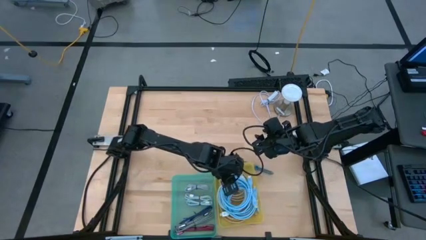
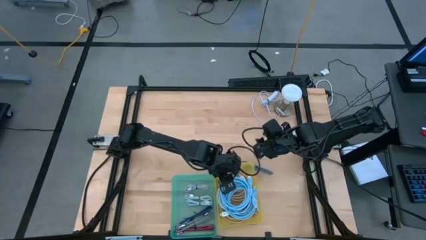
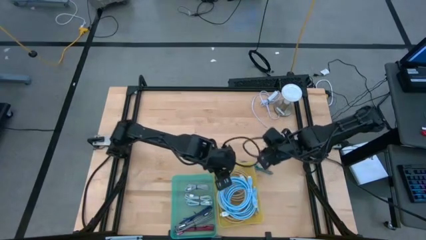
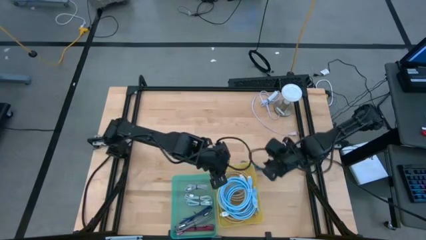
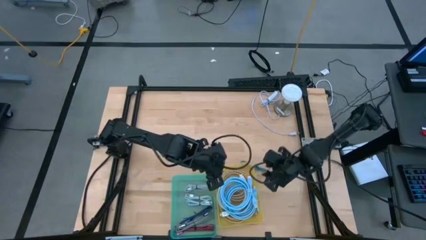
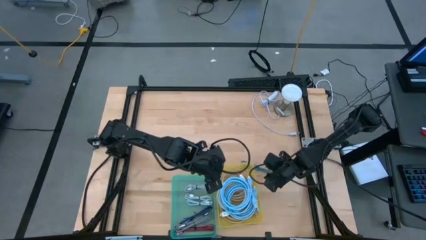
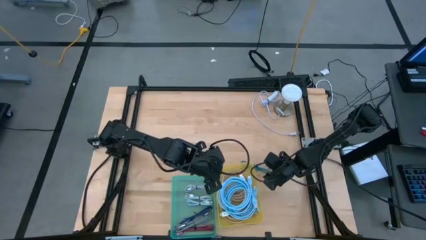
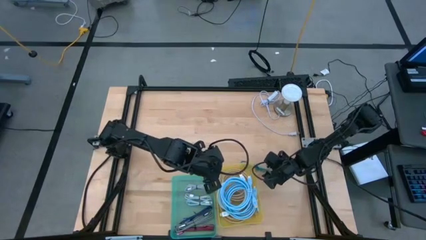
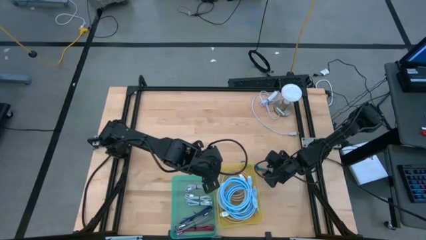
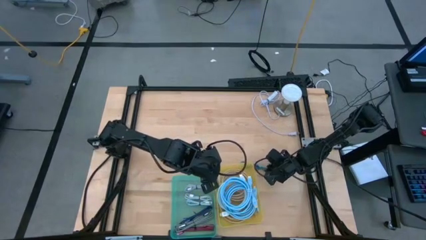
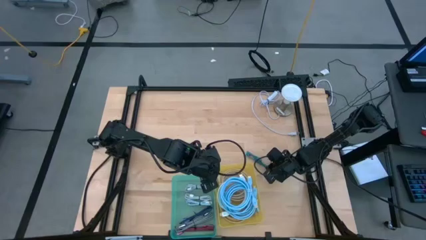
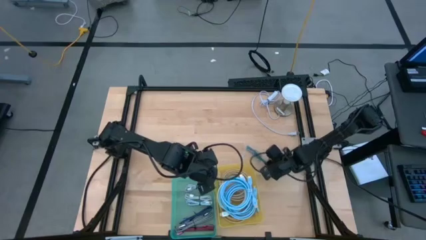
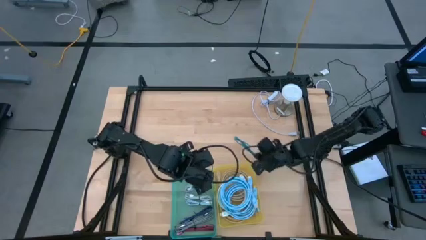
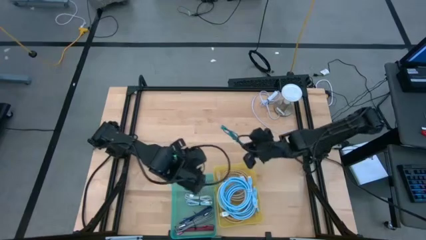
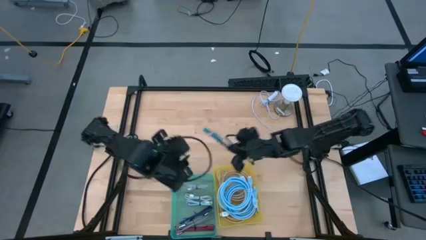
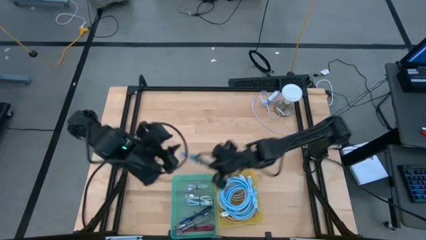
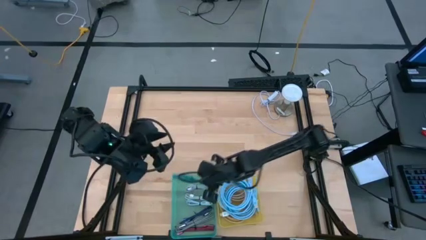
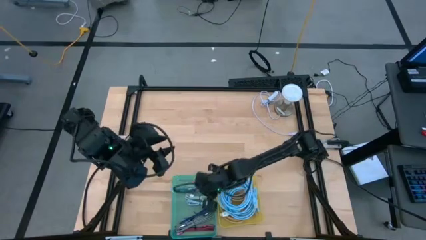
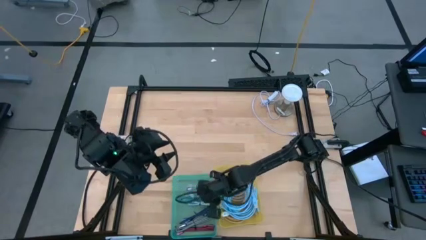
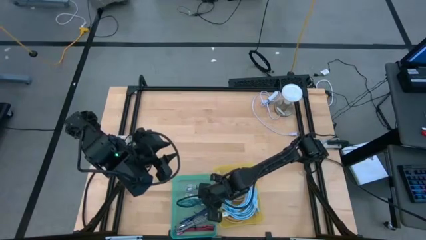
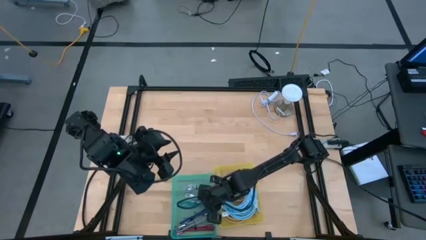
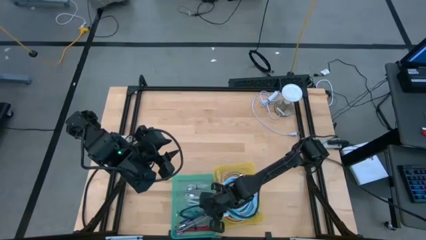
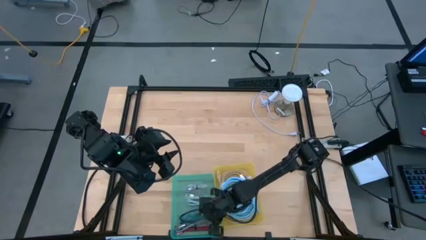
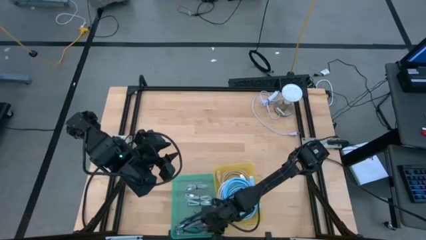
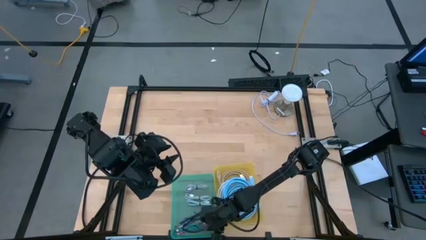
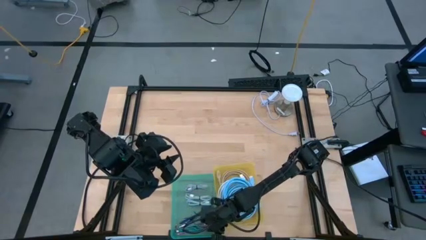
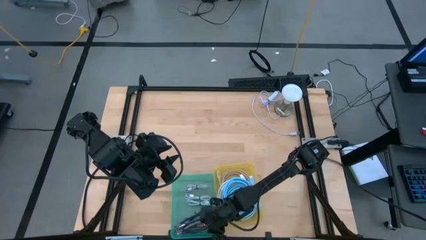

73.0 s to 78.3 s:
Task: Pick & Place USB Port
Put the blue USB cable into the green bin

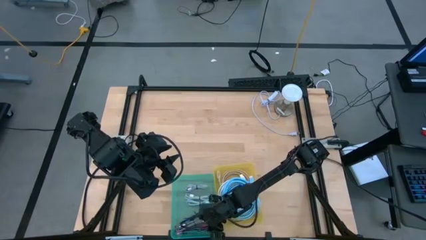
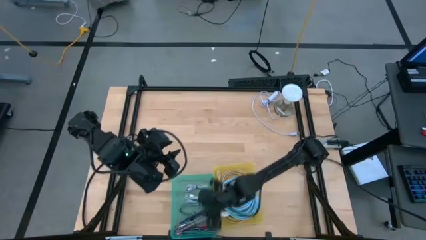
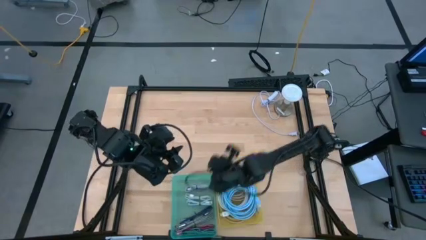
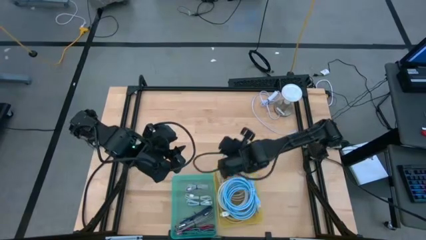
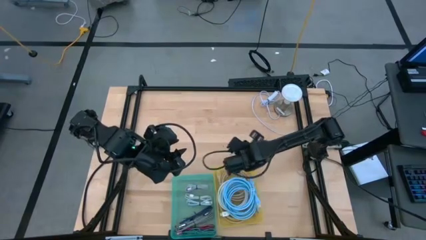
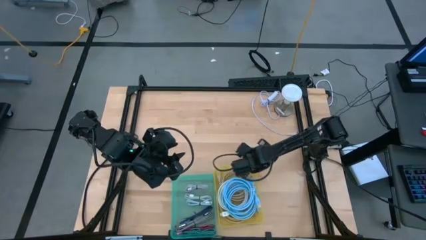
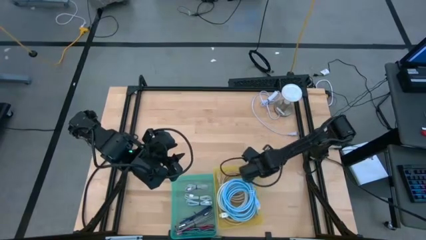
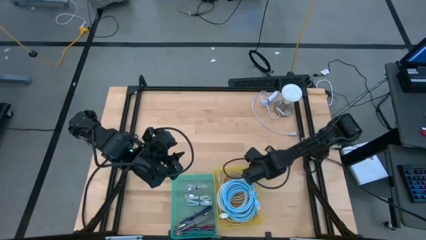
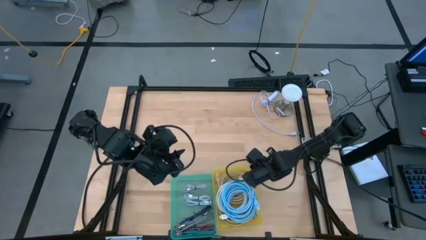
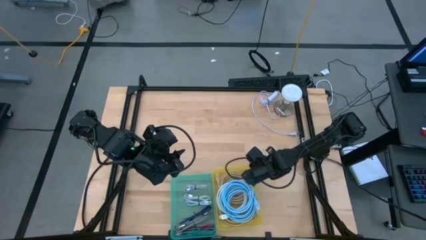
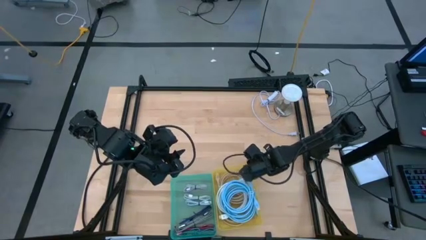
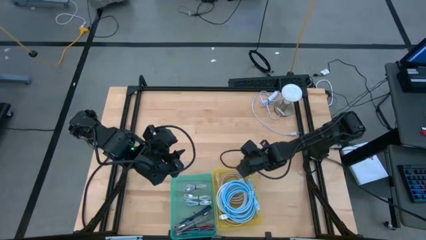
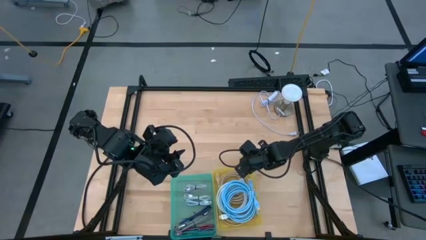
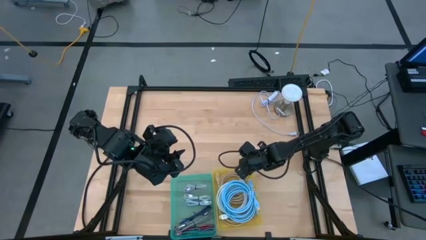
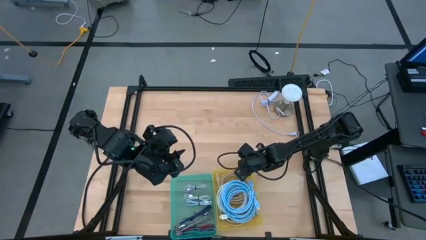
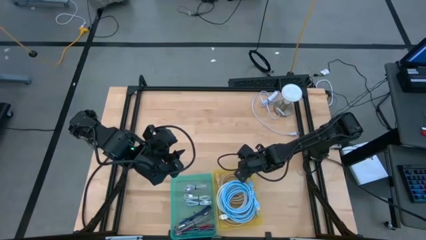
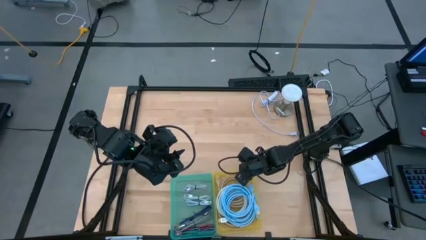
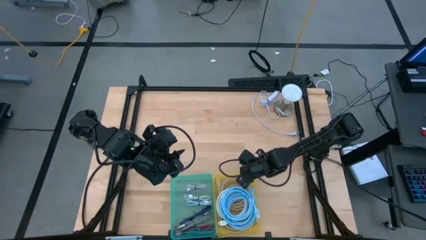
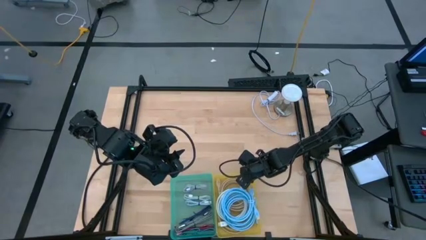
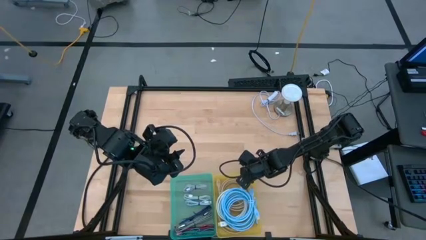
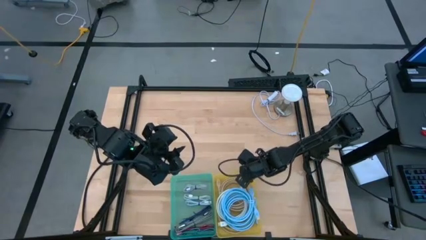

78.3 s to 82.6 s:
Adjust the yellow bin

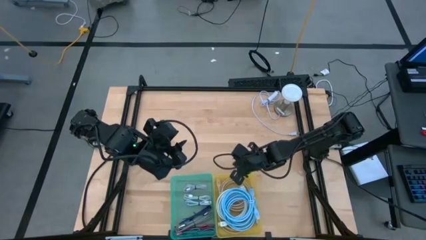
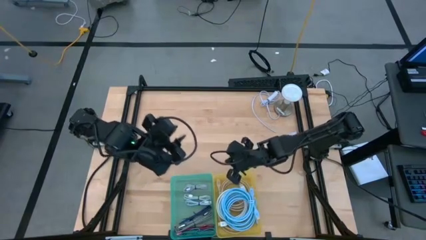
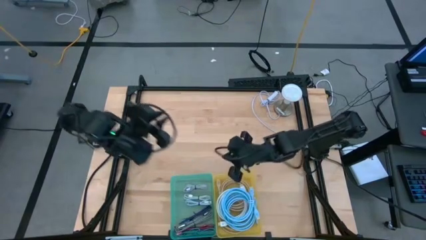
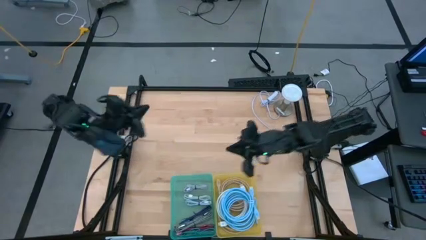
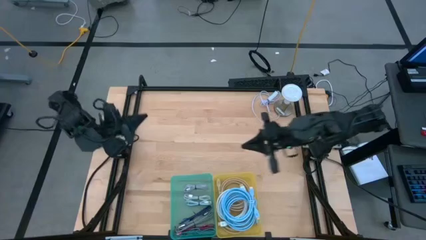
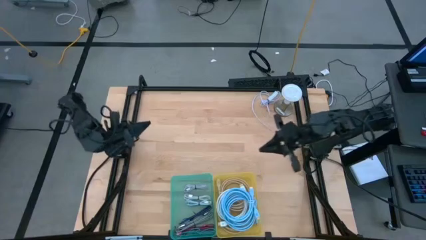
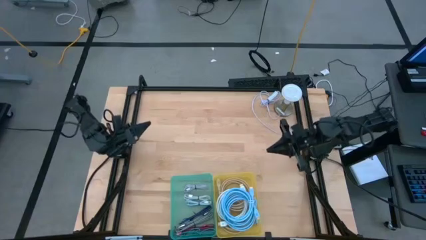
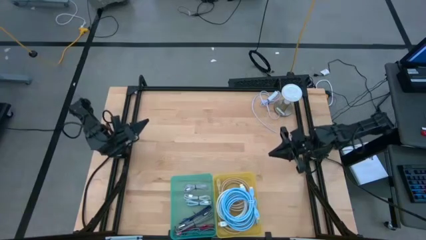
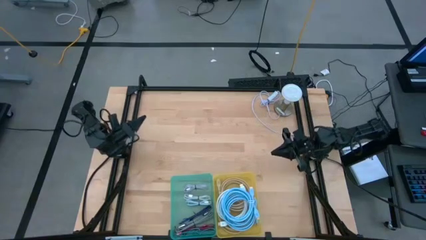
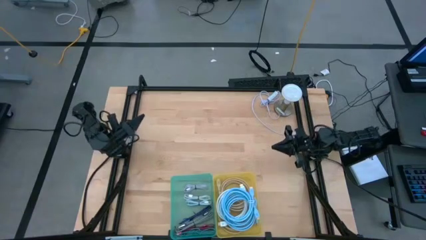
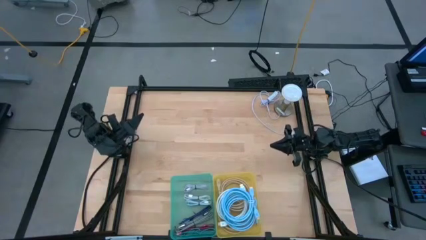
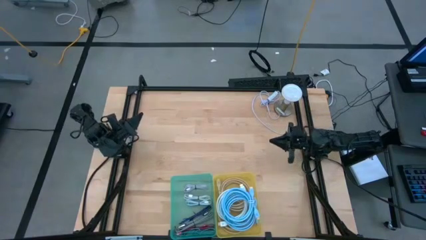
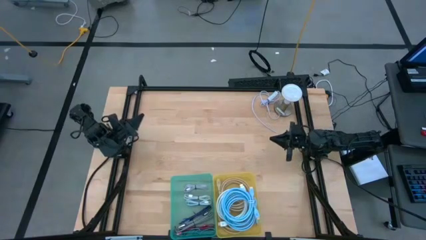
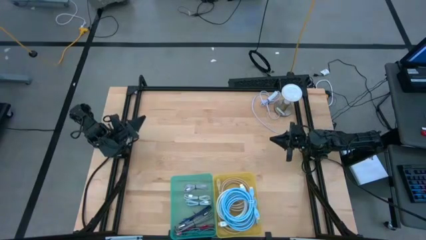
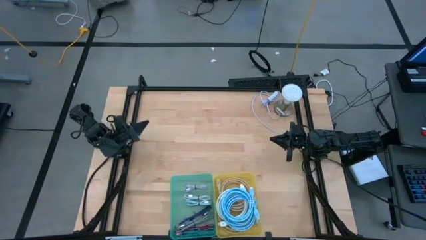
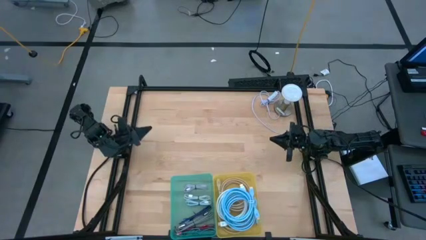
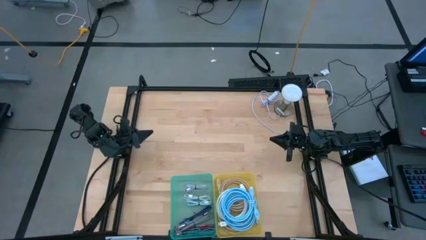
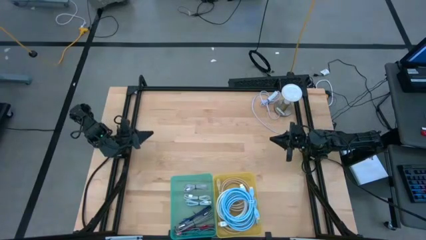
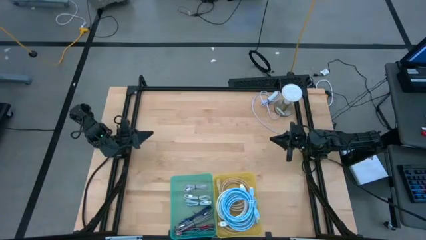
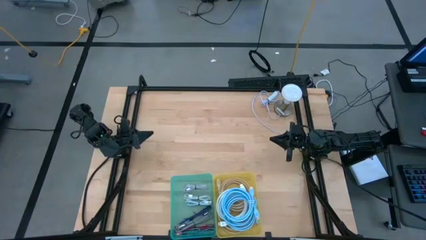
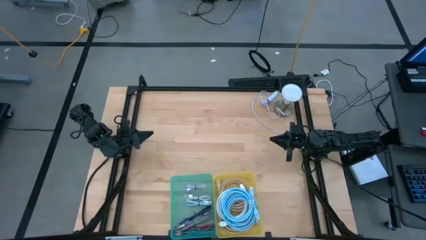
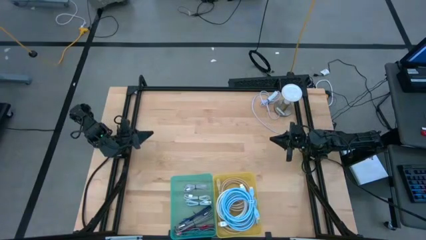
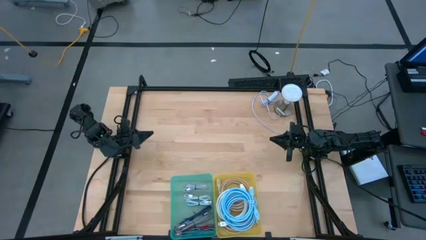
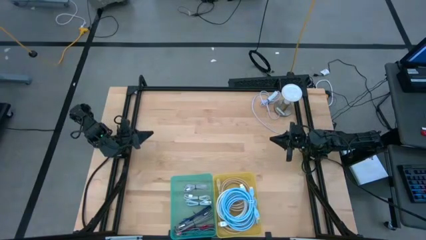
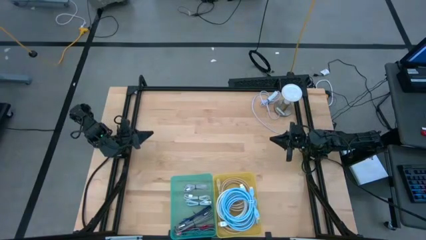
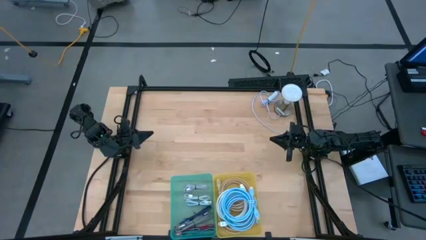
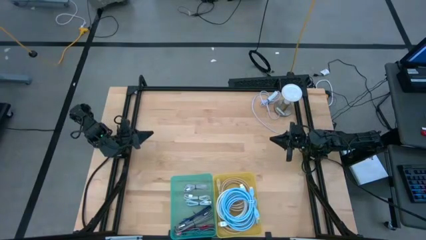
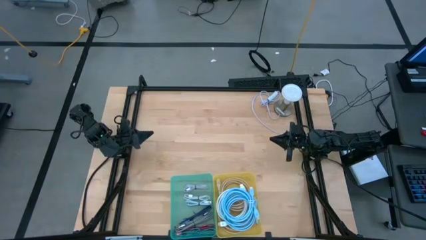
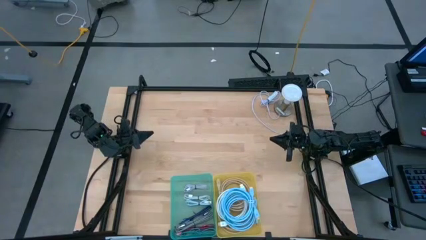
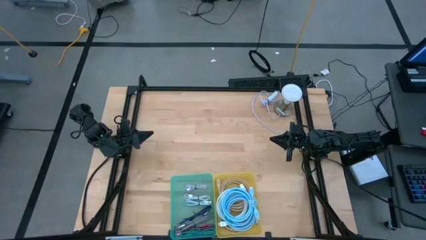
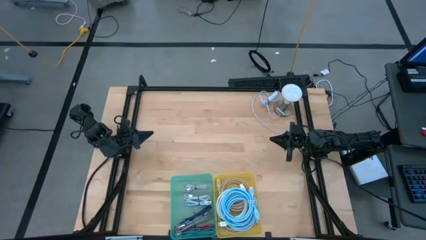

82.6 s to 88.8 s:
Return to Home Position
